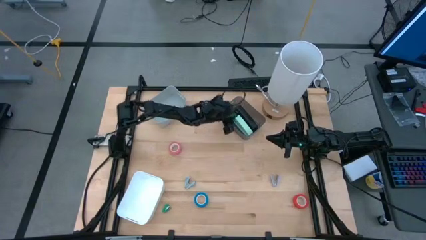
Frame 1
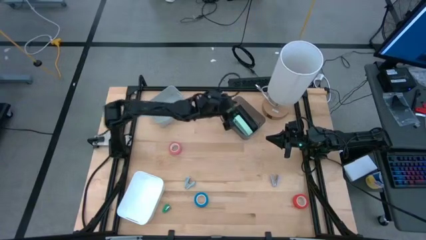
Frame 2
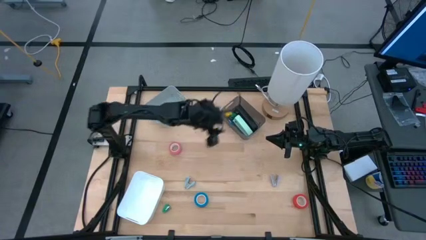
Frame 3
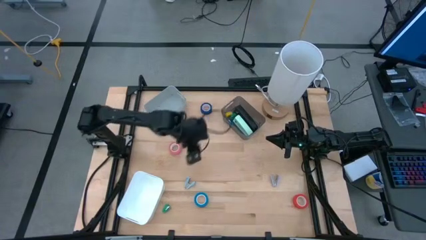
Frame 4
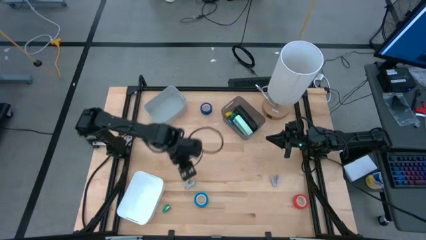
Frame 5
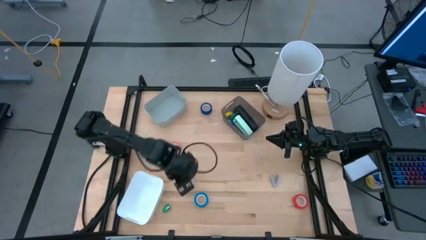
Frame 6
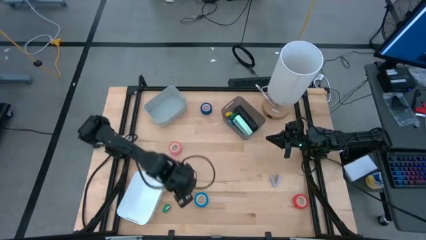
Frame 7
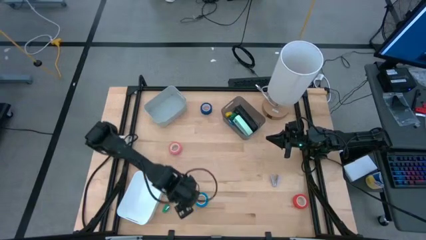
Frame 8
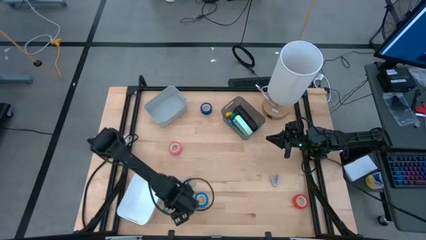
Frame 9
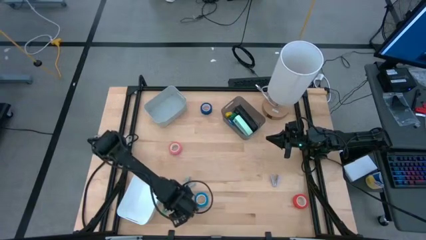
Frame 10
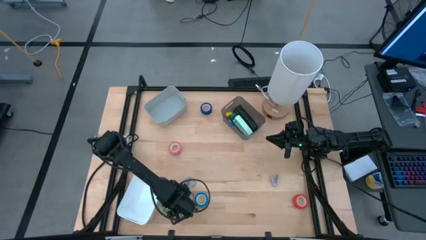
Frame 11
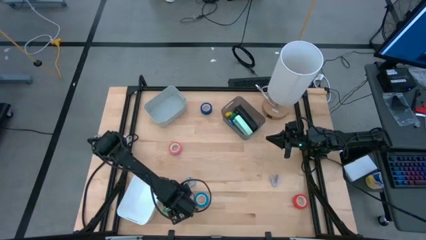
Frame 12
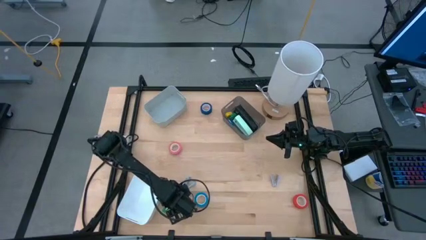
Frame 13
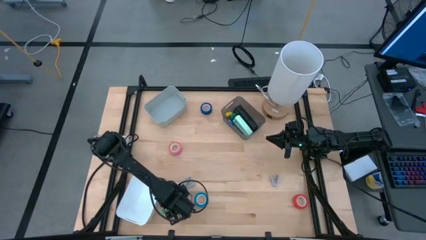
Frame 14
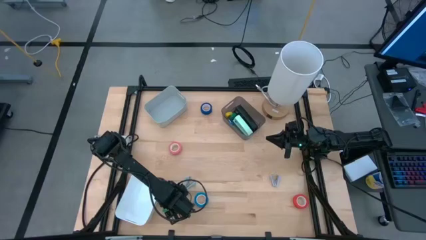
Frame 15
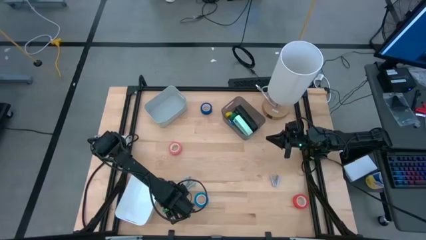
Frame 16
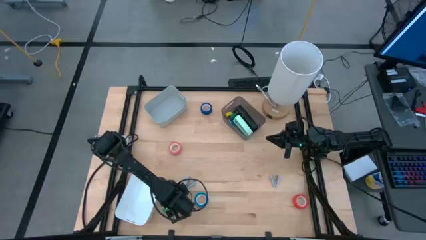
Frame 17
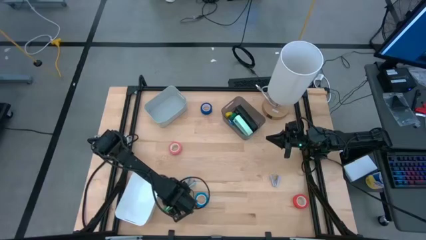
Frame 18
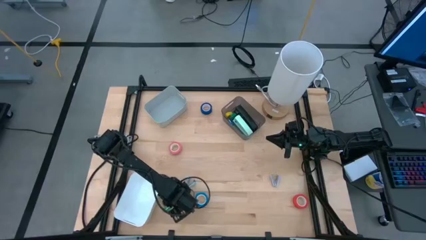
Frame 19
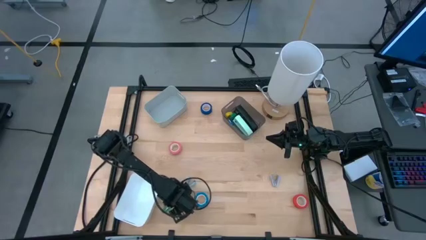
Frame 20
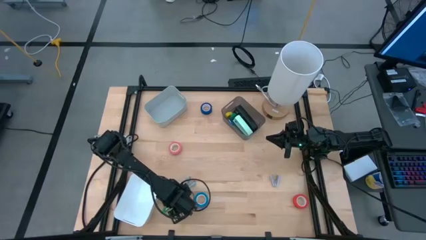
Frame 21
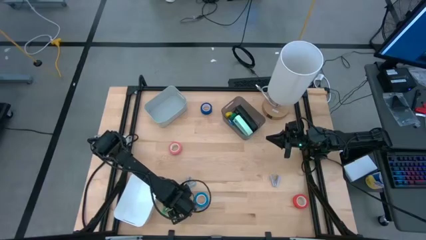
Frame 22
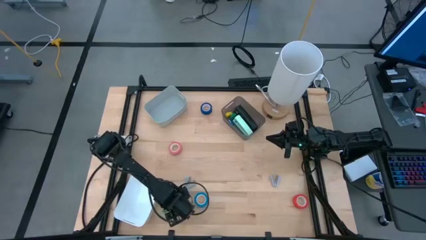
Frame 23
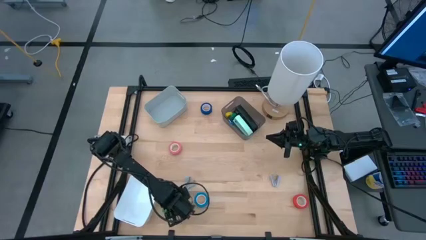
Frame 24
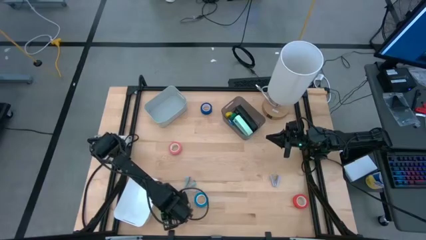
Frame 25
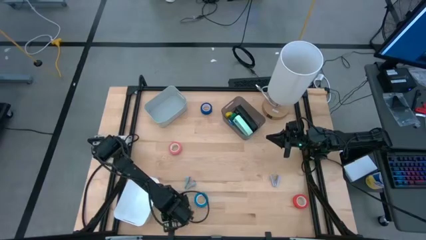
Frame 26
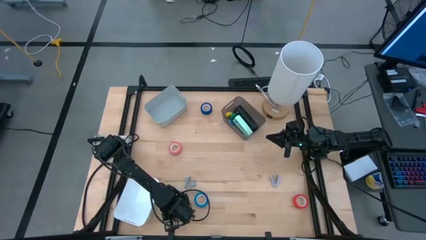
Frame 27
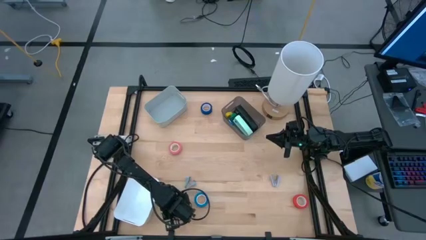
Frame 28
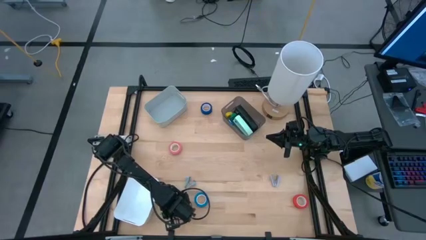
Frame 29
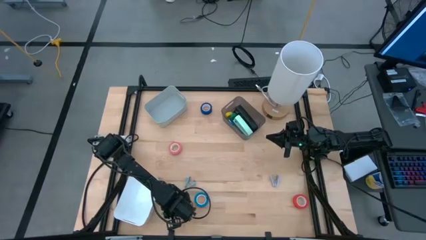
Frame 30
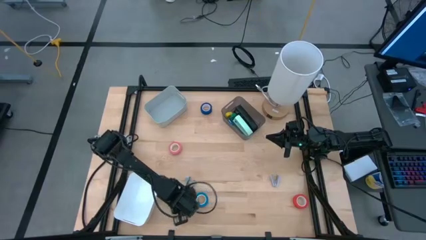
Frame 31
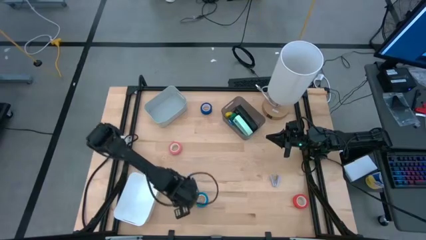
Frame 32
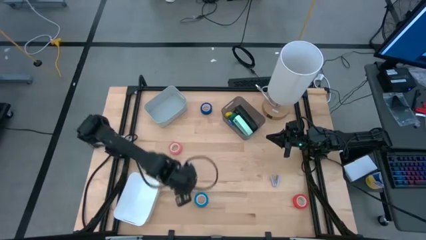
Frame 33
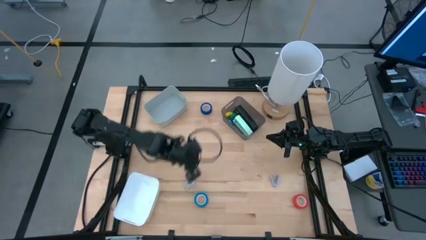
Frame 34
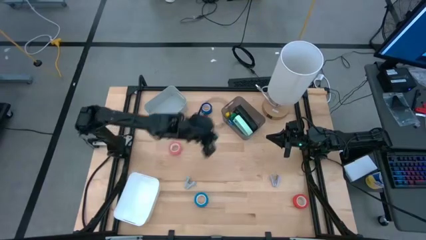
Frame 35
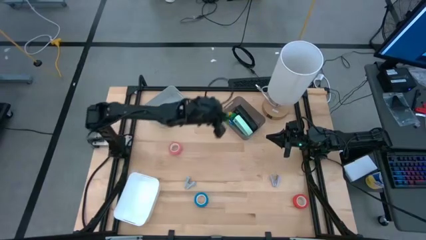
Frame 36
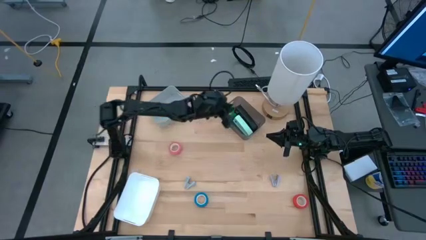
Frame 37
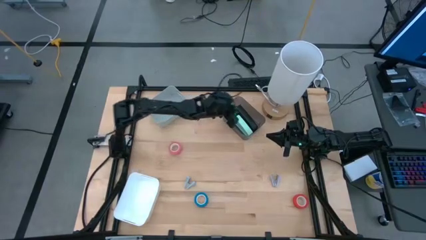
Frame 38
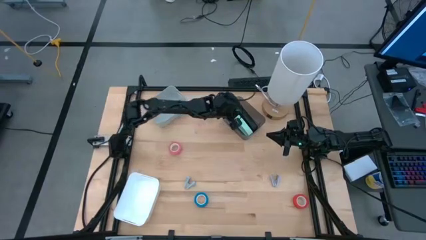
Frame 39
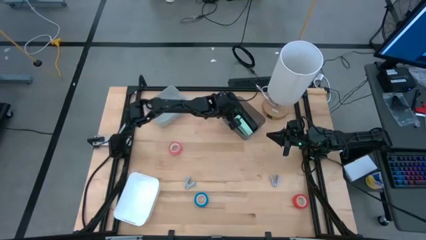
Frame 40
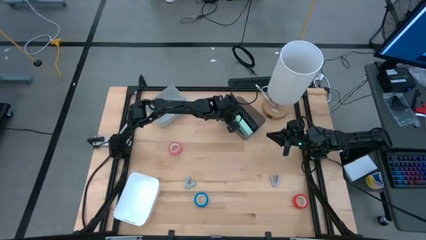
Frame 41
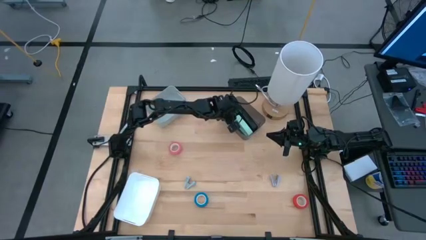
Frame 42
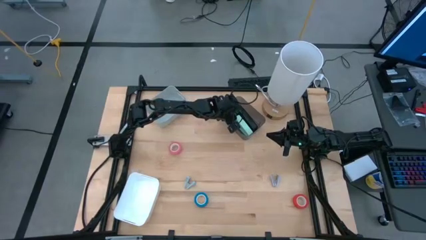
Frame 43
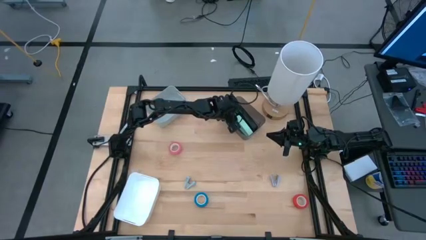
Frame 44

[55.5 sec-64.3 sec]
Task: Pick and place Stapler, Stapler remover, tape
Put the green stapler into the black bin

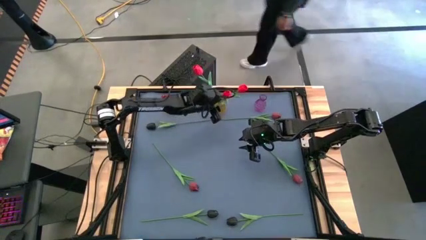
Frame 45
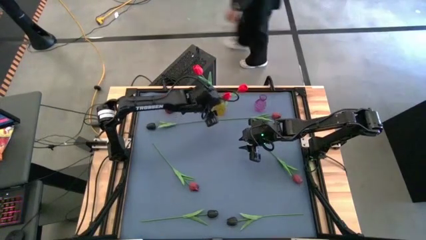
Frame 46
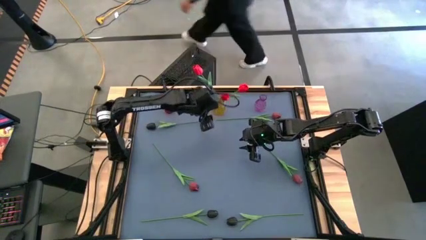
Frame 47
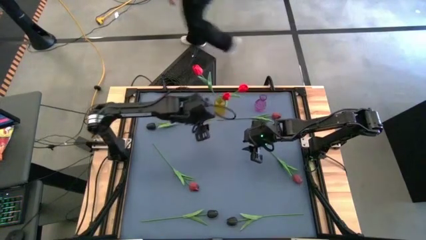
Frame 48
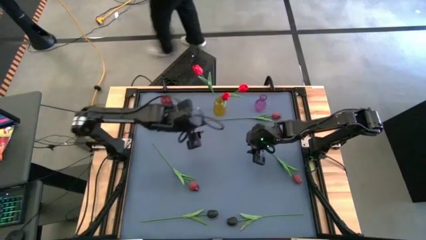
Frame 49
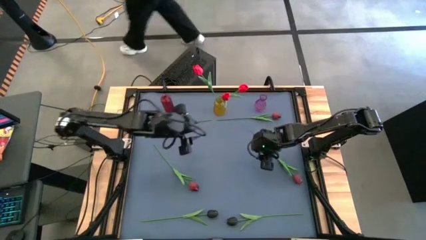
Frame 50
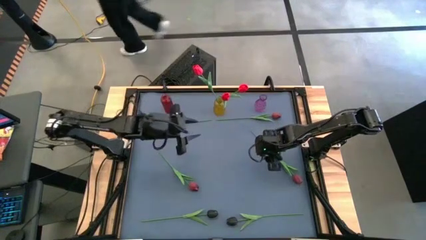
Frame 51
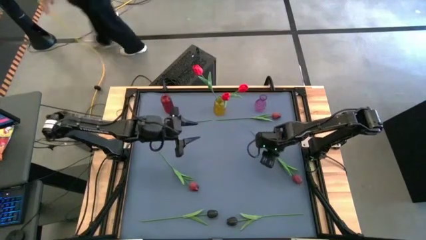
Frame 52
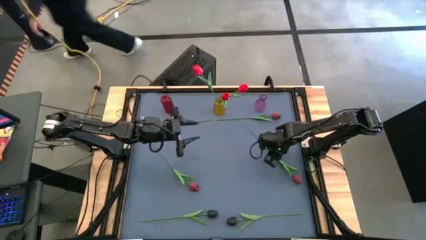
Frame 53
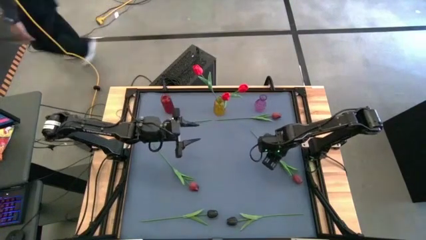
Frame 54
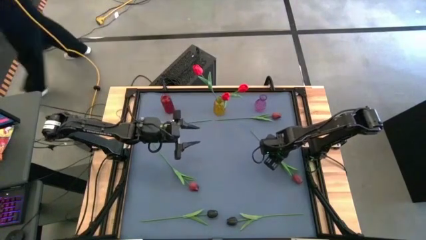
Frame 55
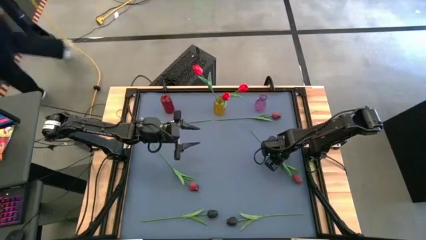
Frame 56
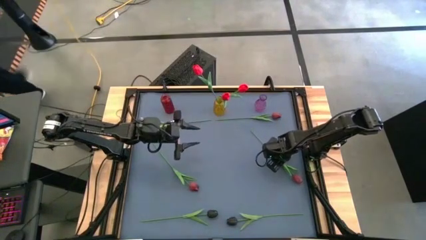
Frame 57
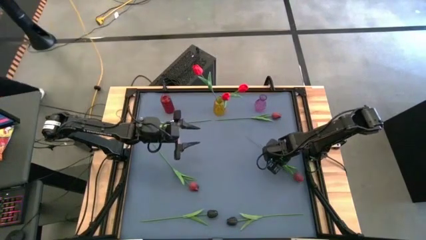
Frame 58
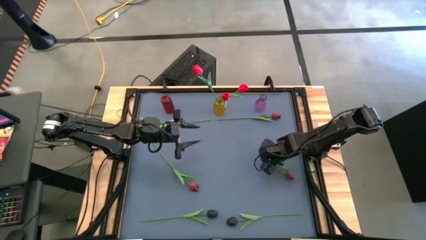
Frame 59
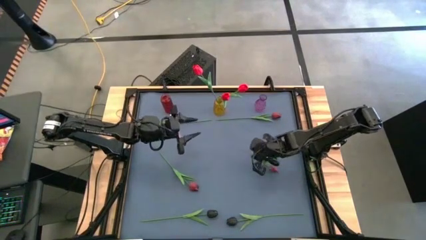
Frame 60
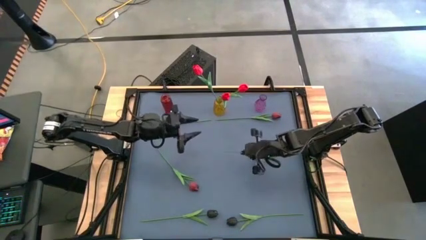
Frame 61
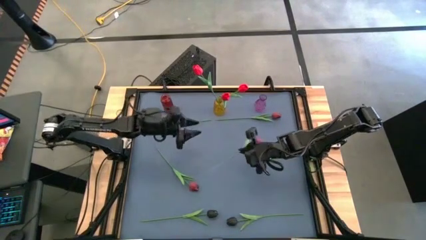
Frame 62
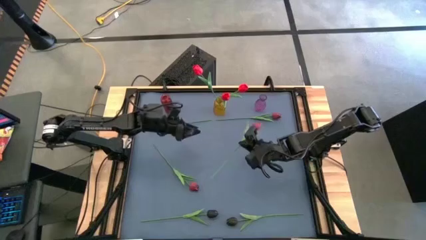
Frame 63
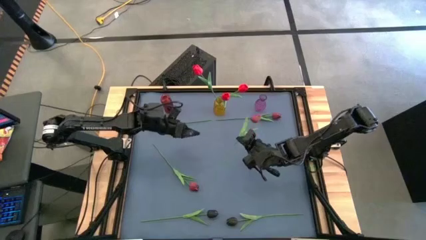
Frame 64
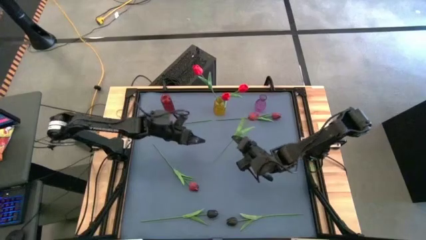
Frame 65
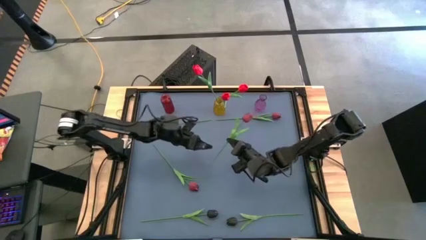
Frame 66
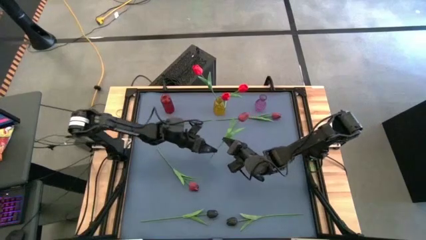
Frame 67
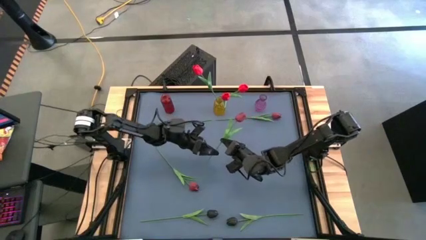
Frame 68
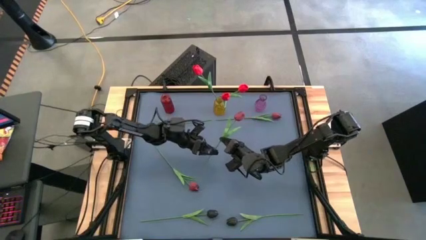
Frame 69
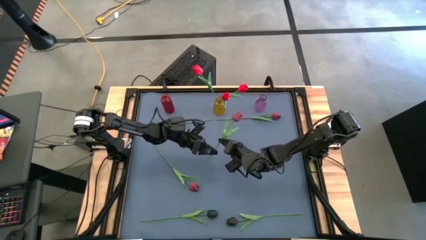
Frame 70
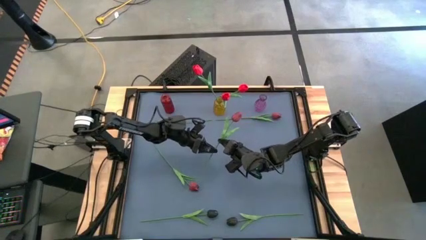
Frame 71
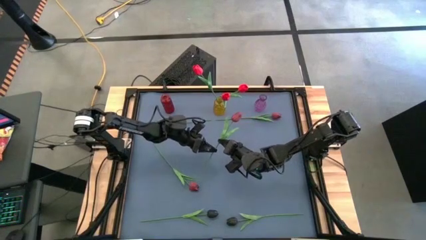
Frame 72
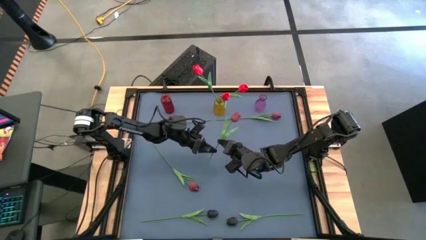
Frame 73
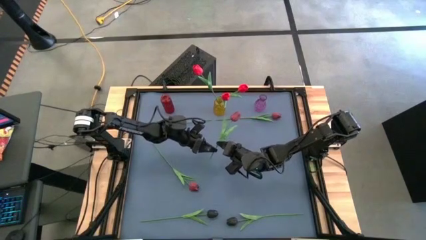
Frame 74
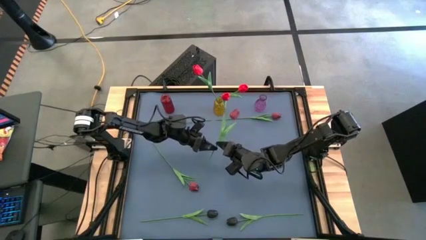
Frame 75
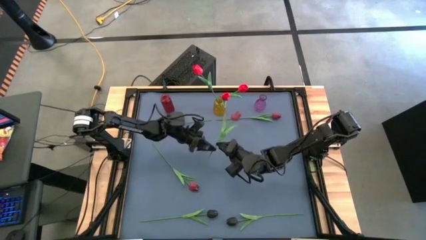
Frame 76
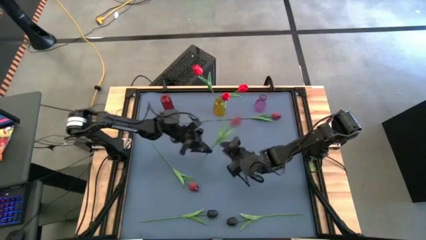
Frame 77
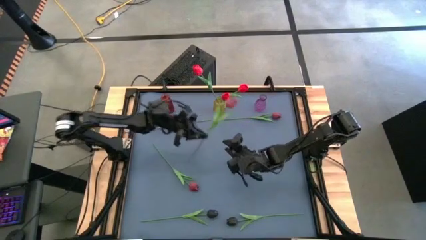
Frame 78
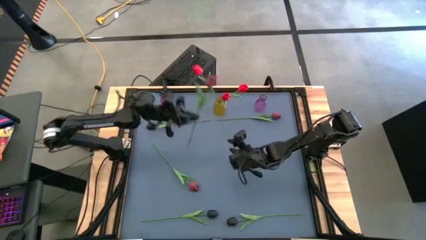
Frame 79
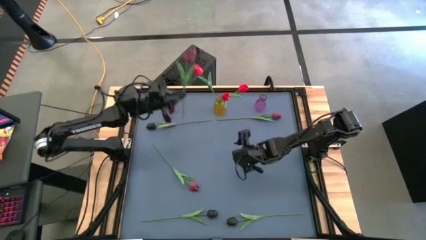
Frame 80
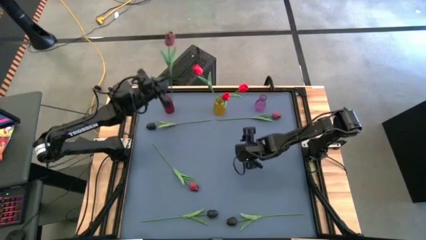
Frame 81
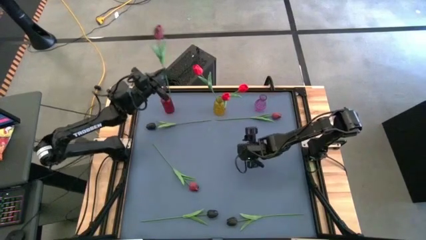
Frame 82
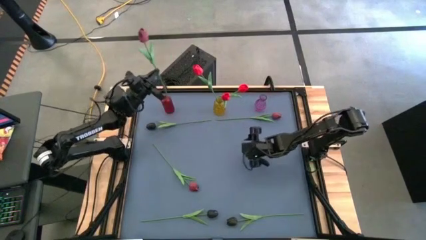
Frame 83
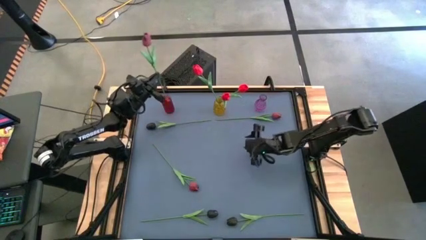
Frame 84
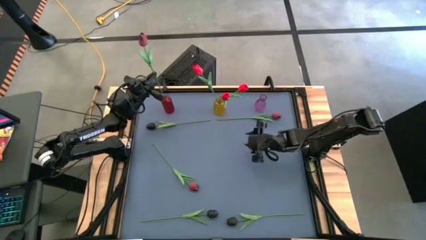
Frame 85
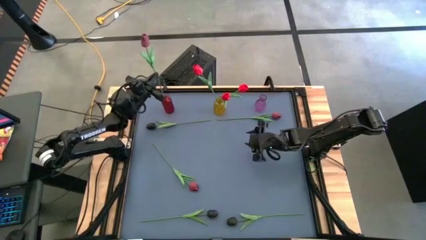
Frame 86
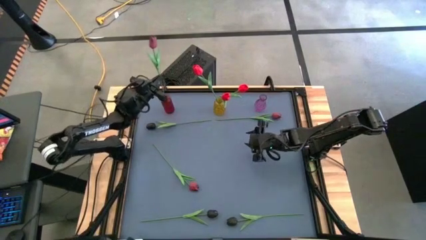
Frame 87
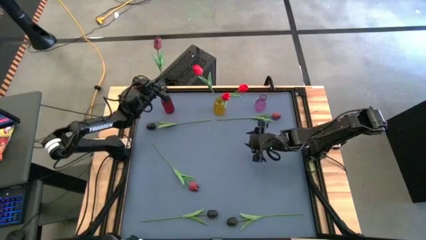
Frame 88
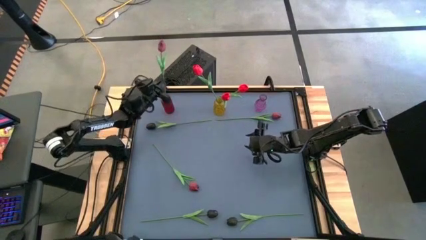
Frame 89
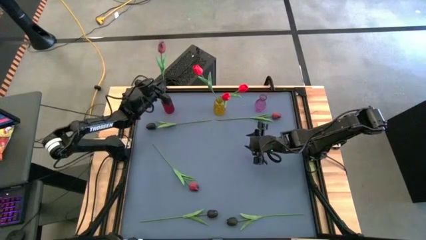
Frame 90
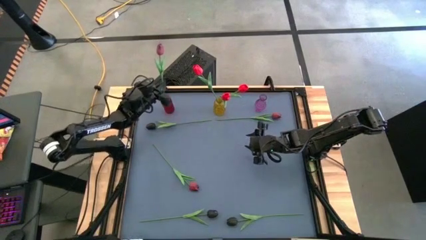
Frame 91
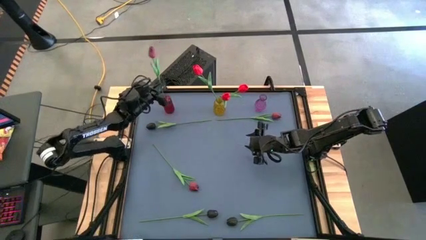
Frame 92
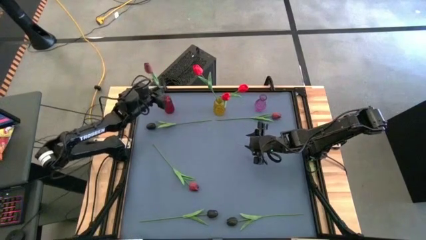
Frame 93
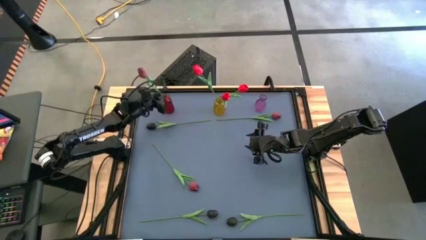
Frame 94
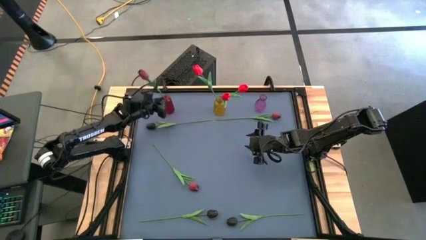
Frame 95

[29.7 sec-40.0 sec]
Task: Sort flowers into vase by color
Put the bottom right dark red tulip into the red vase
